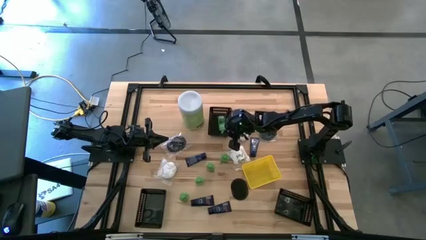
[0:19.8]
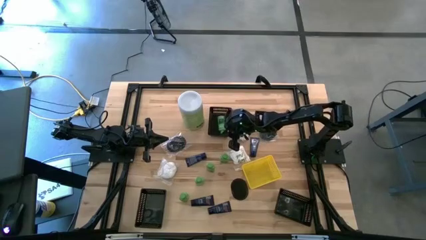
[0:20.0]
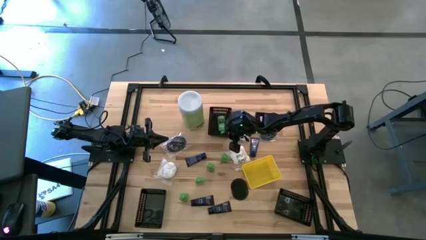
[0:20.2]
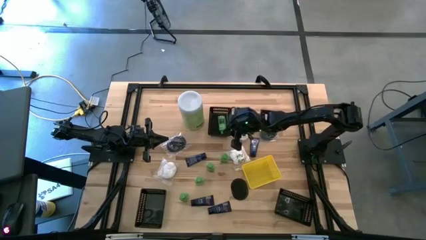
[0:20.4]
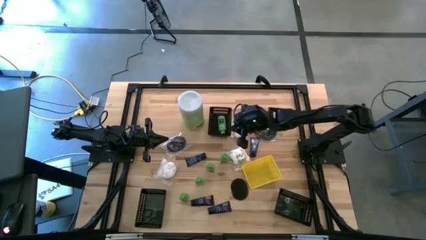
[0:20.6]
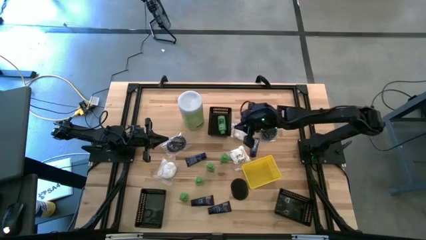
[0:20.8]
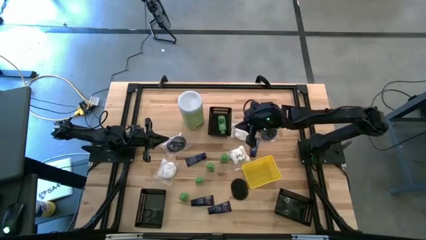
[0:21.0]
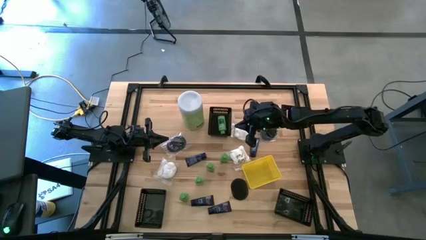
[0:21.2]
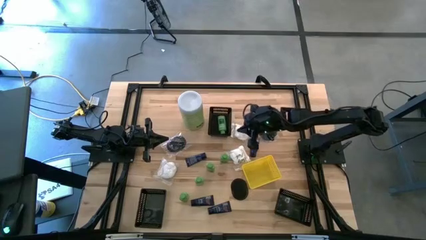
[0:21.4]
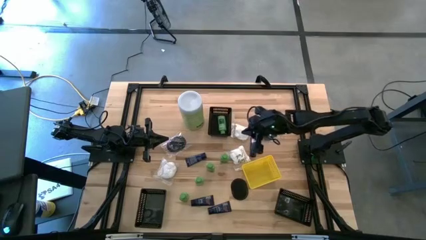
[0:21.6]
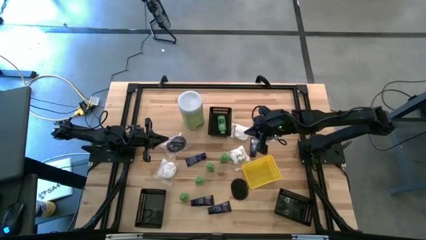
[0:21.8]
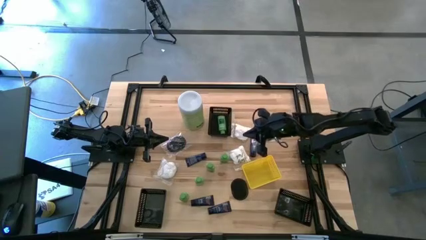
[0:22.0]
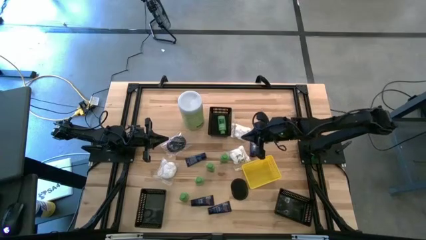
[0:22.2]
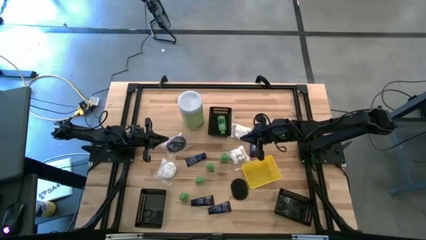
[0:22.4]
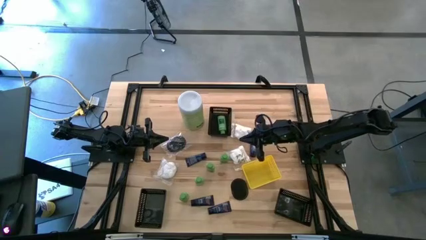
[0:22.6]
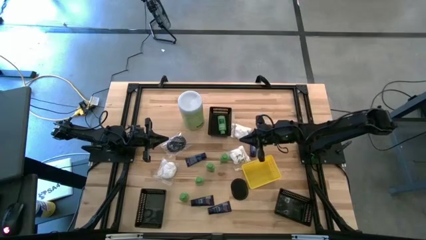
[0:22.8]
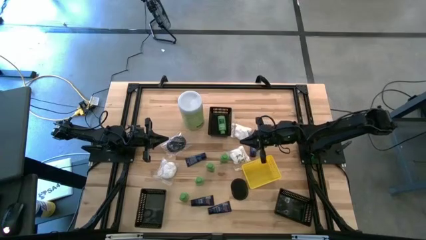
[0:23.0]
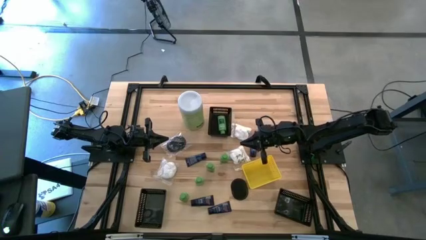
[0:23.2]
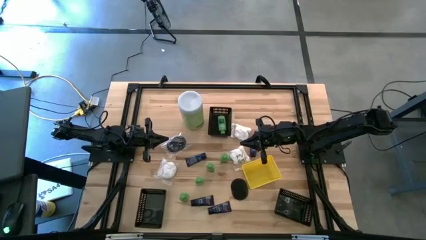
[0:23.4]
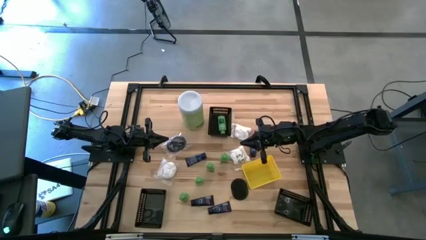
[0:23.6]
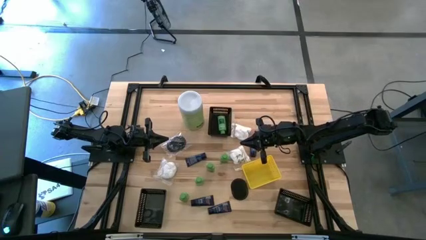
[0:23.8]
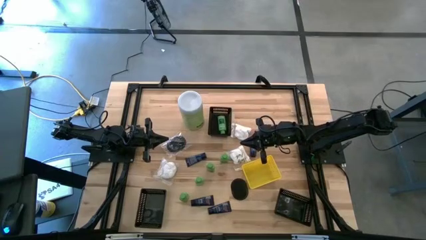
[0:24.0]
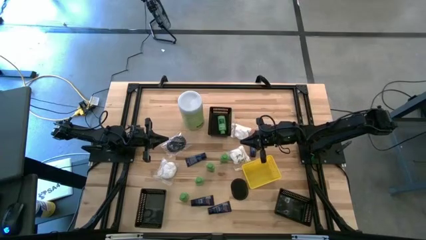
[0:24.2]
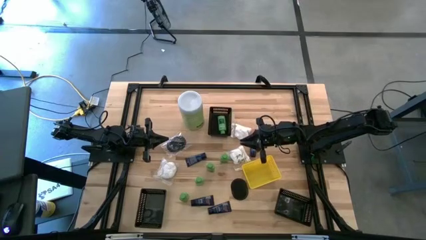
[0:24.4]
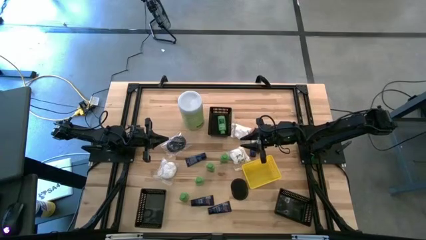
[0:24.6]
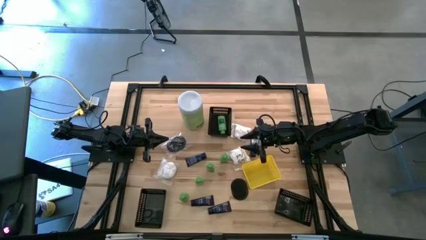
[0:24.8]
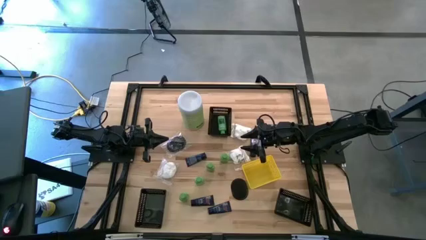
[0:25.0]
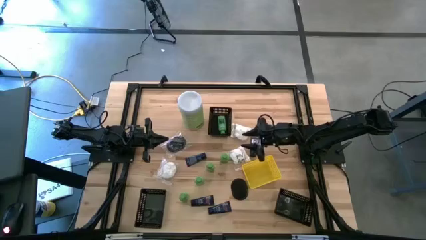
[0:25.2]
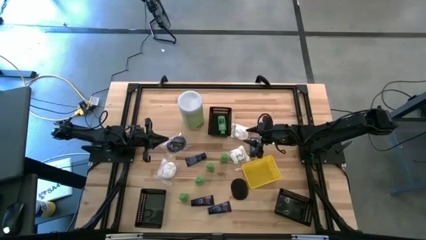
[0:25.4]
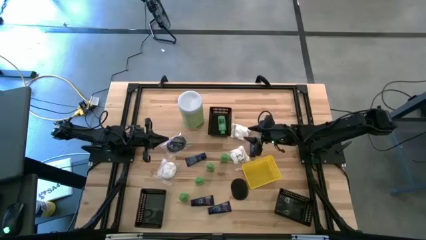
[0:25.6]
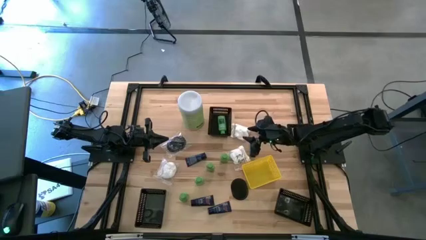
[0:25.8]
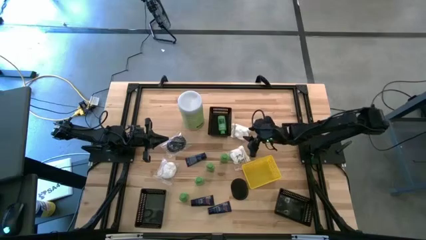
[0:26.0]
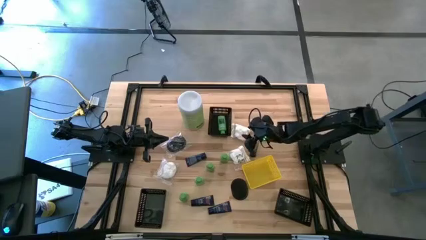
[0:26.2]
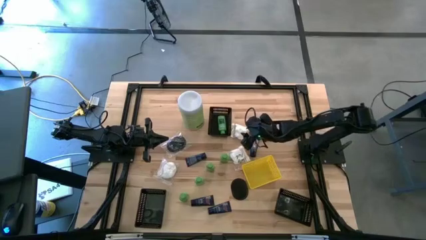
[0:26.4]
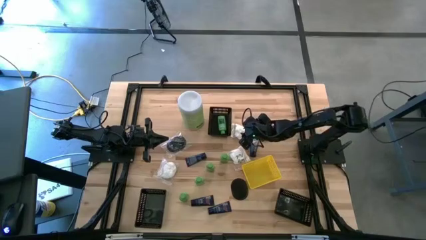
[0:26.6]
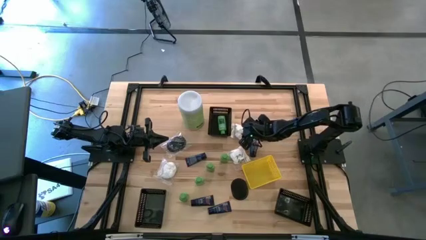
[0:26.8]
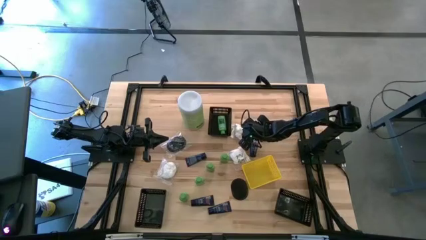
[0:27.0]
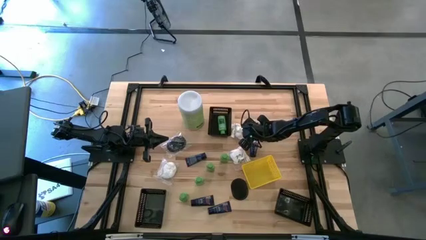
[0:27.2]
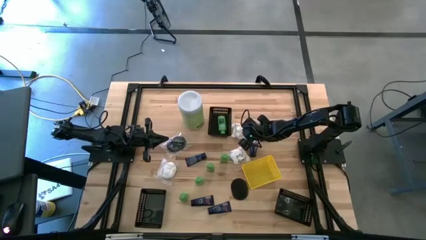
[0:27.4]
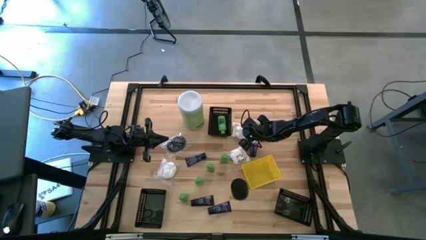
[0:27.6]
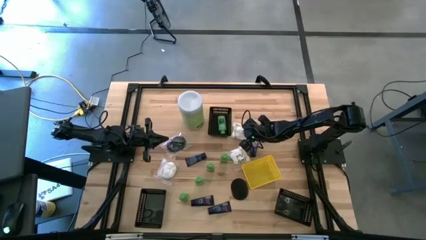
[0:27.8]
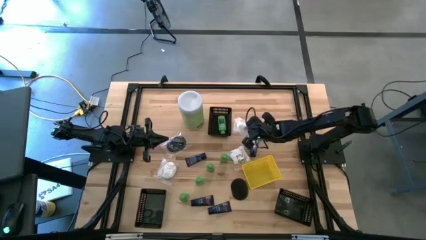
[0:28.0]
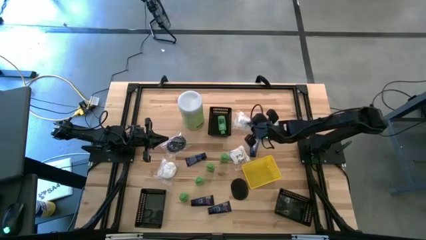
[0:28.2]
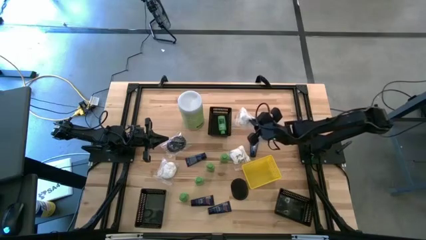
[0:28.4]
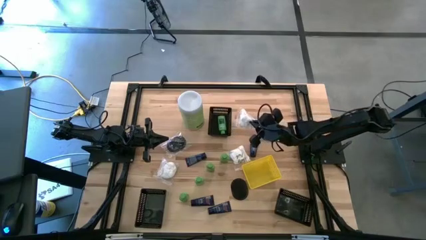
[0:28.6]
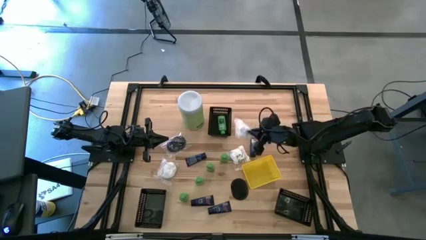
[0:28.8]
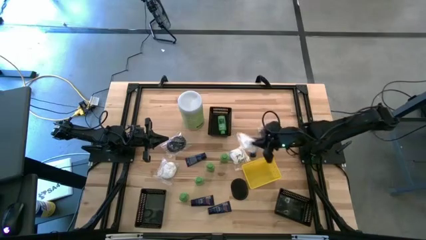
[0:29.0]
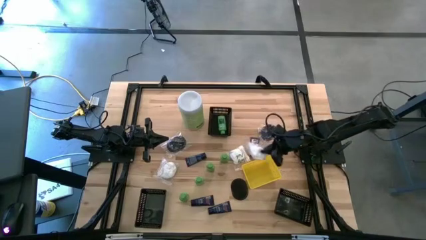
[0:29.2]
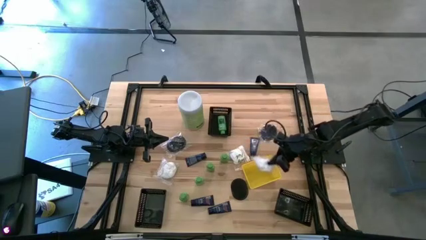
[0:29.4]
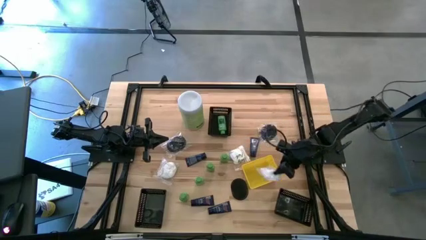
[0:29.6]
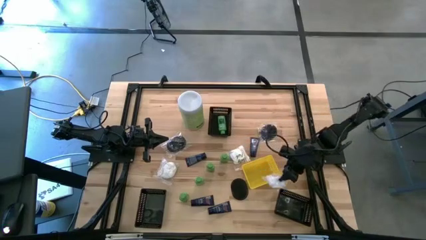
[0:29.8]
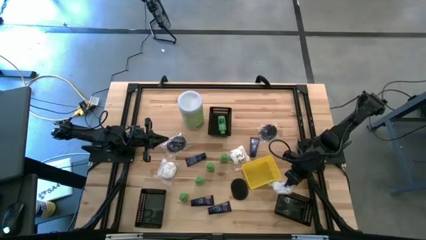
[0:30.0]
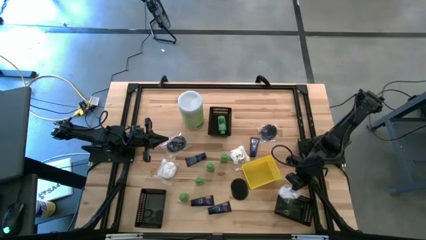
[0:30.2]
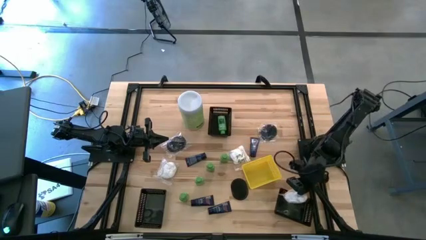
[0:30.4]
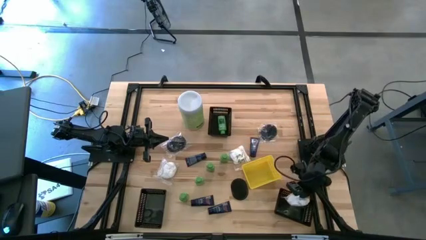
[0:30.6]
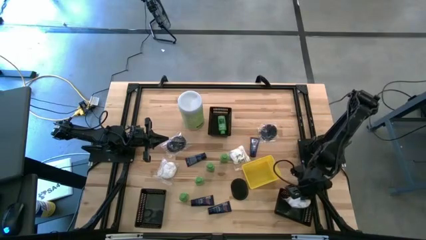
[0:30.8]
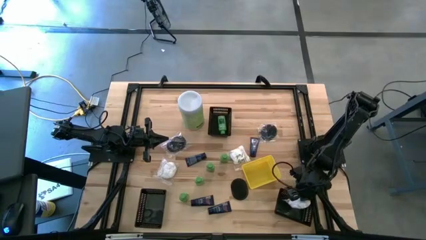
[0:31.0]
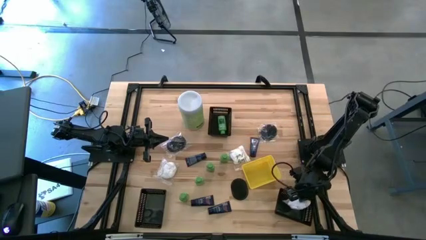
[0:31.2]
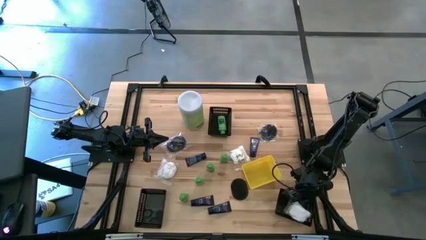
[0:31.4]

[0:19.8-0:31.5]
Task: Pick & Place Travel size toiletries
Put the white cotton pack into the bottom right black bin
